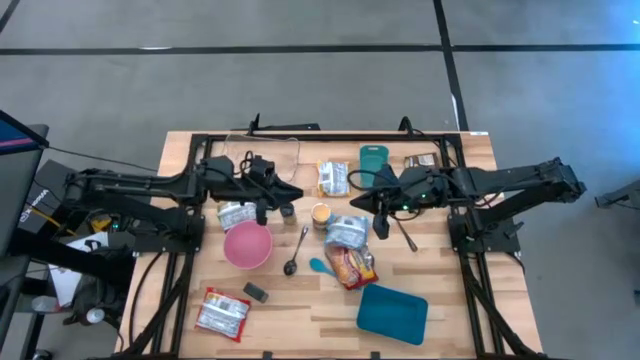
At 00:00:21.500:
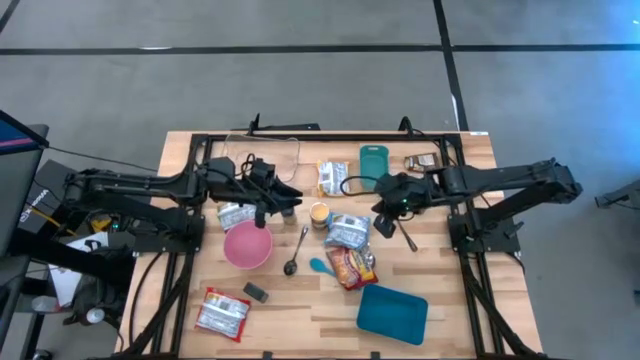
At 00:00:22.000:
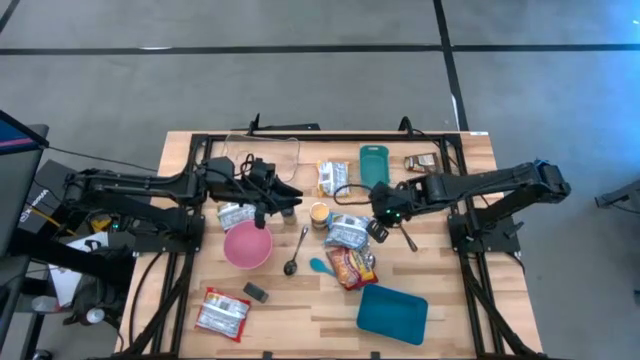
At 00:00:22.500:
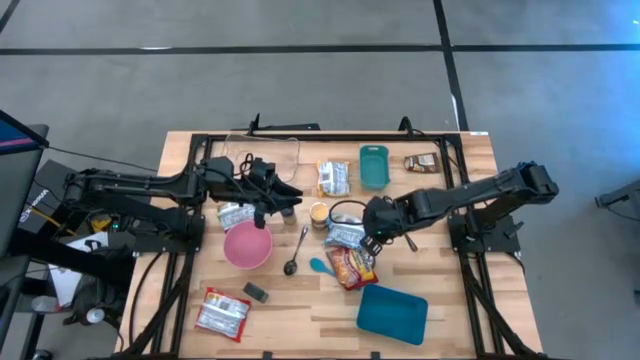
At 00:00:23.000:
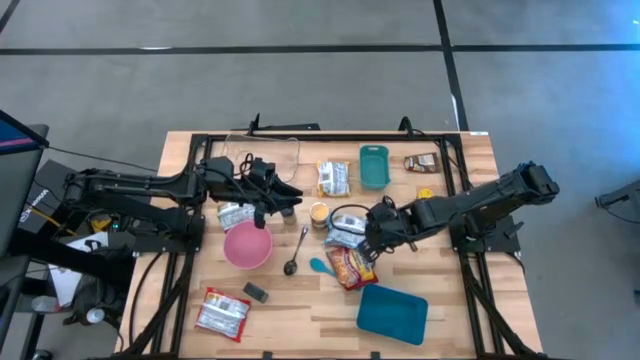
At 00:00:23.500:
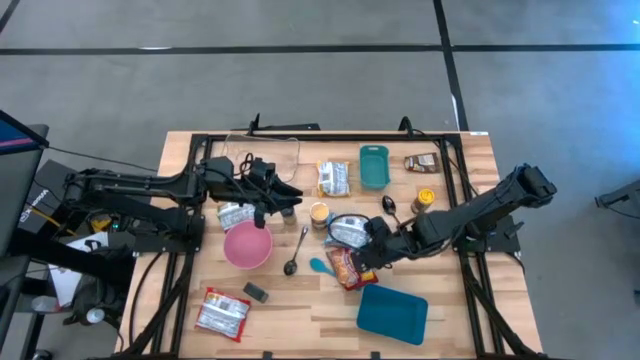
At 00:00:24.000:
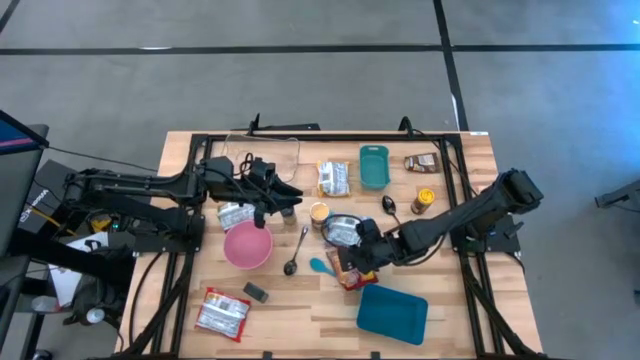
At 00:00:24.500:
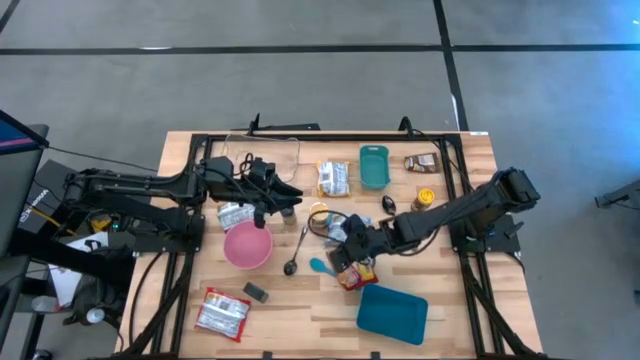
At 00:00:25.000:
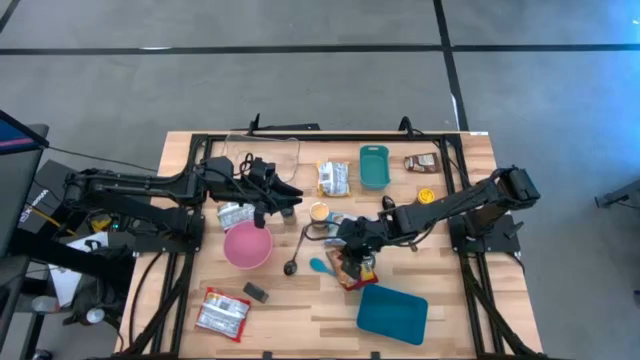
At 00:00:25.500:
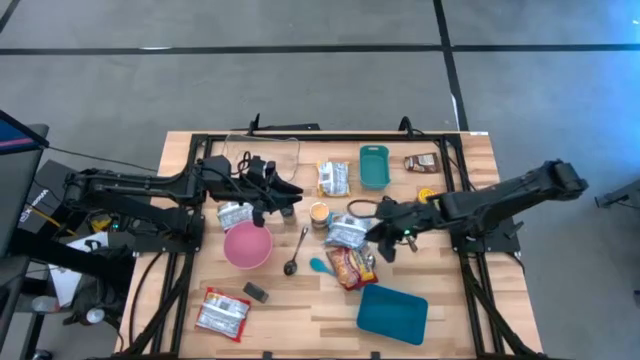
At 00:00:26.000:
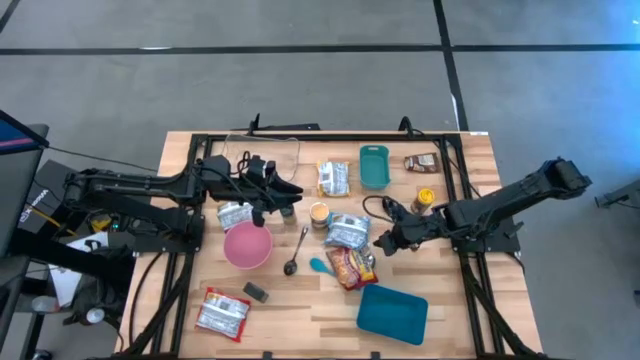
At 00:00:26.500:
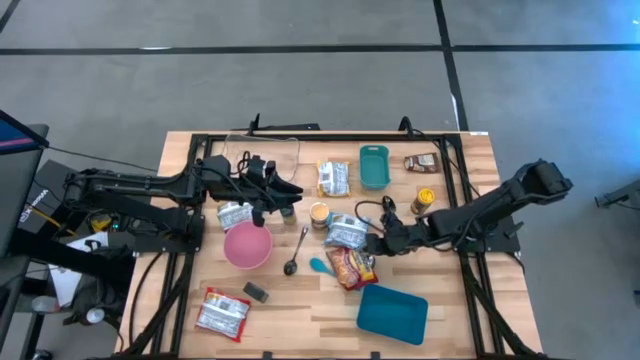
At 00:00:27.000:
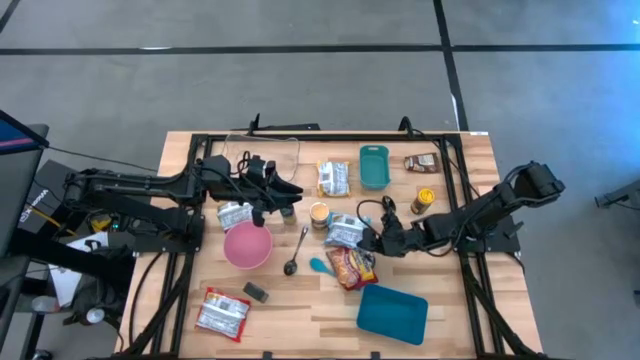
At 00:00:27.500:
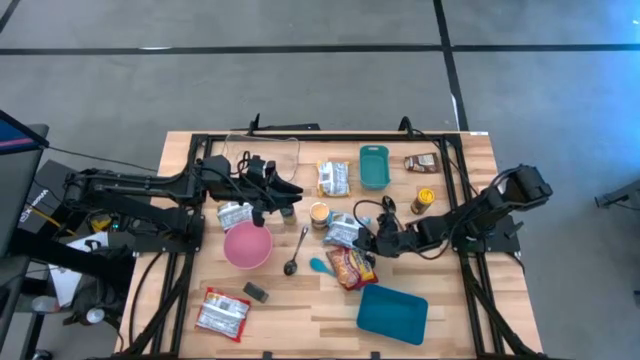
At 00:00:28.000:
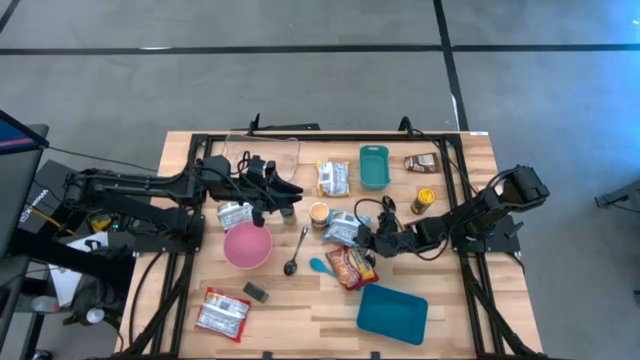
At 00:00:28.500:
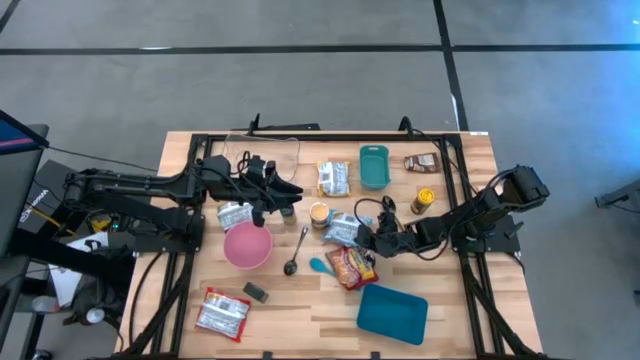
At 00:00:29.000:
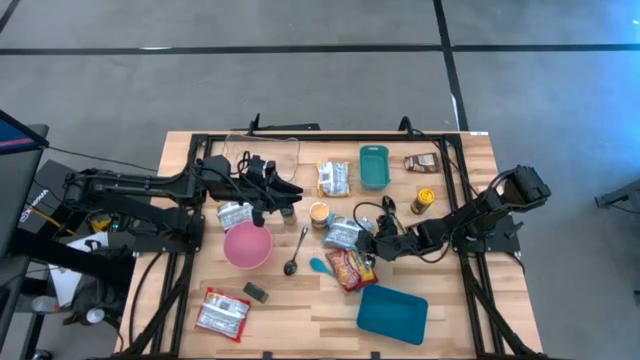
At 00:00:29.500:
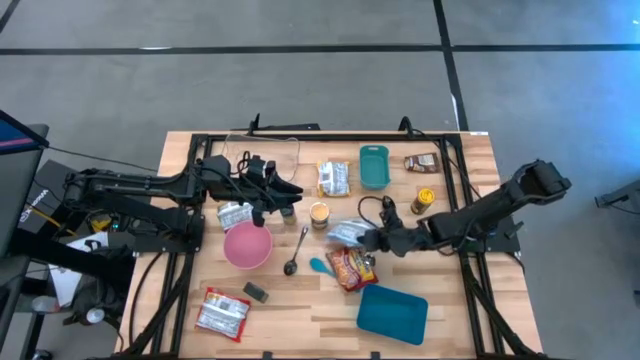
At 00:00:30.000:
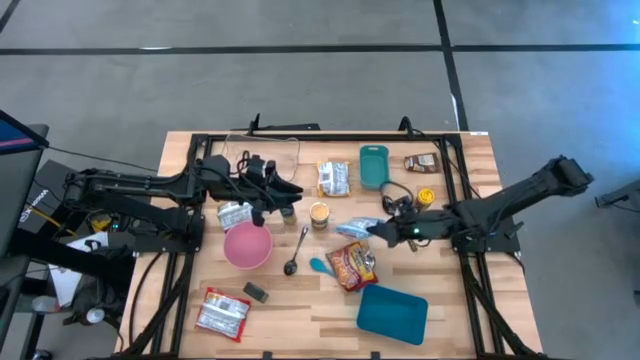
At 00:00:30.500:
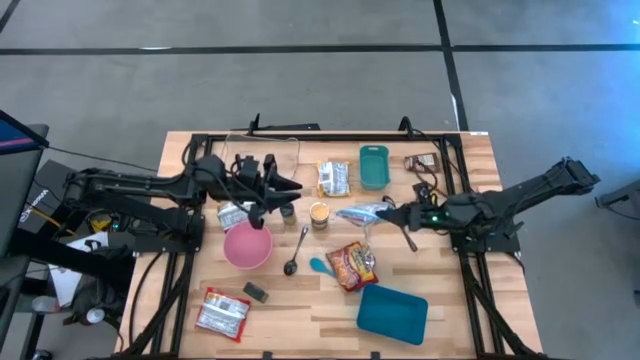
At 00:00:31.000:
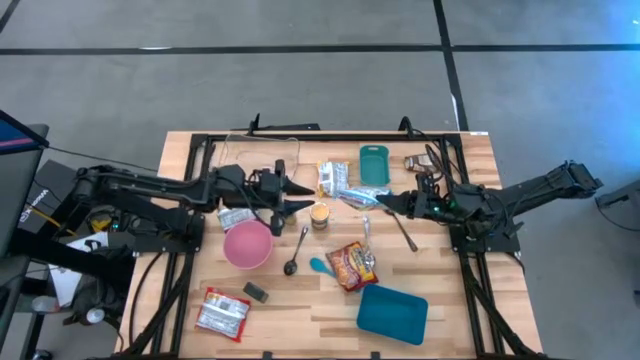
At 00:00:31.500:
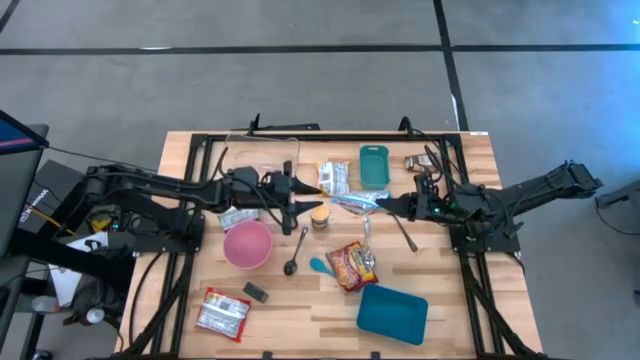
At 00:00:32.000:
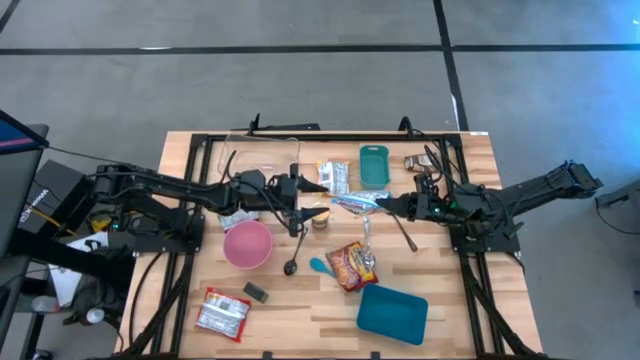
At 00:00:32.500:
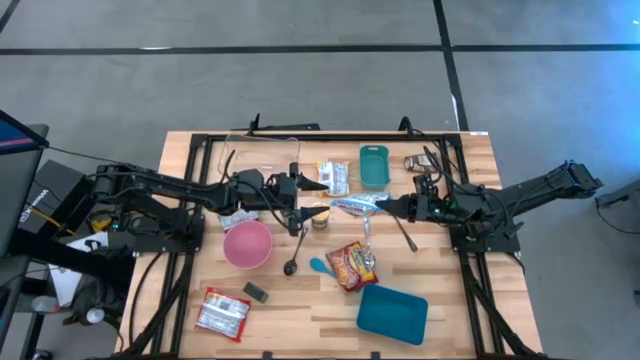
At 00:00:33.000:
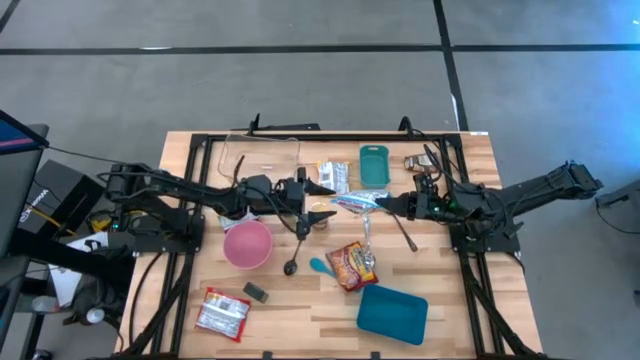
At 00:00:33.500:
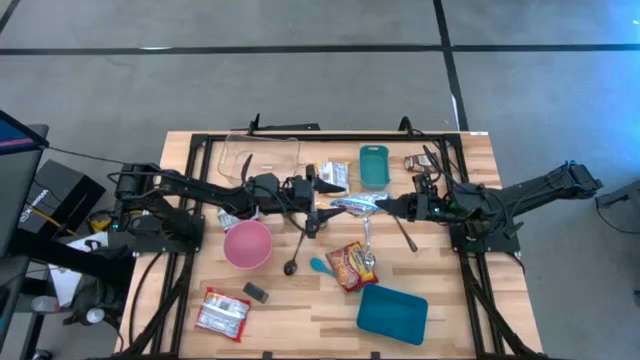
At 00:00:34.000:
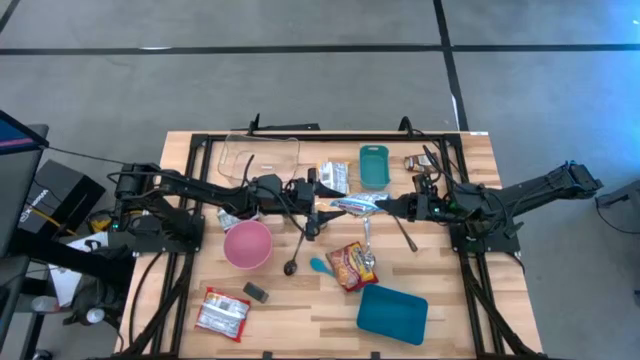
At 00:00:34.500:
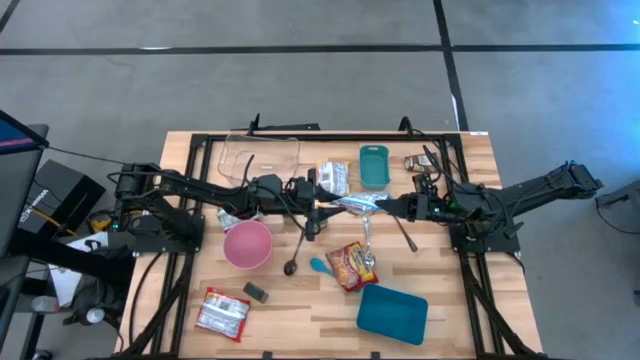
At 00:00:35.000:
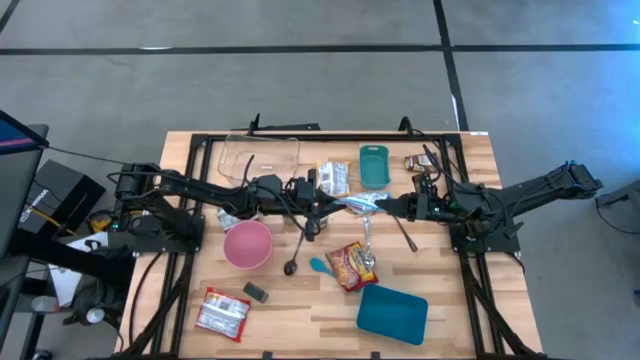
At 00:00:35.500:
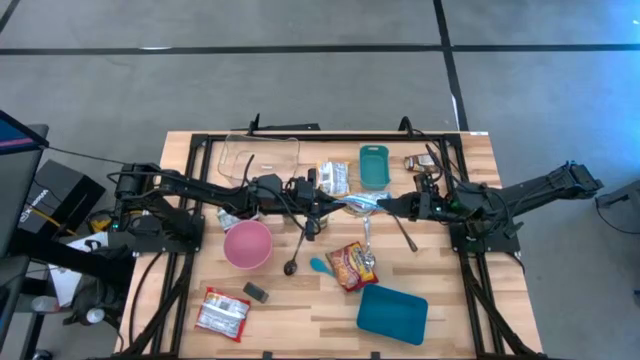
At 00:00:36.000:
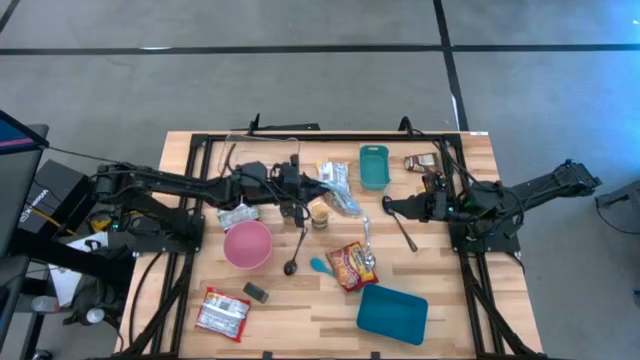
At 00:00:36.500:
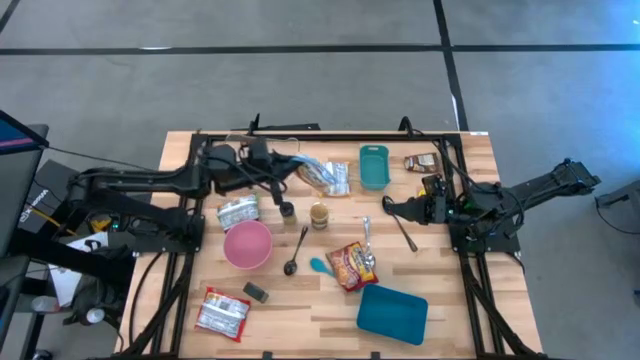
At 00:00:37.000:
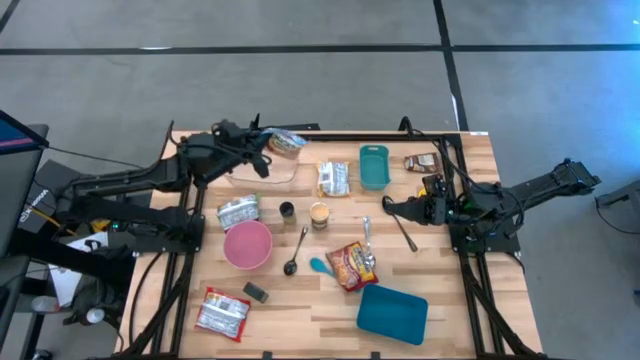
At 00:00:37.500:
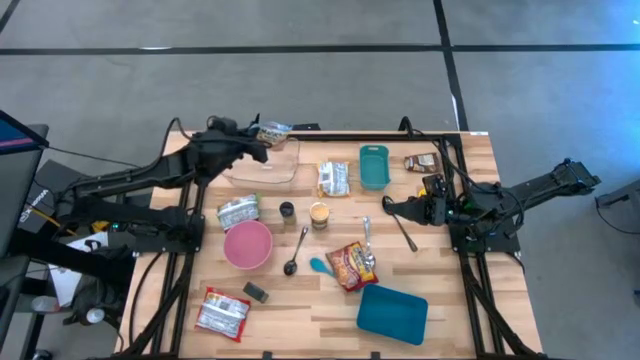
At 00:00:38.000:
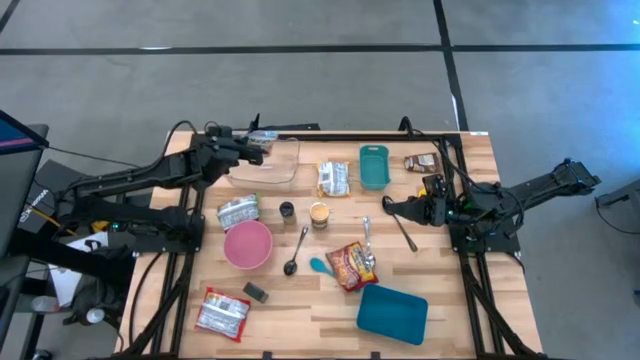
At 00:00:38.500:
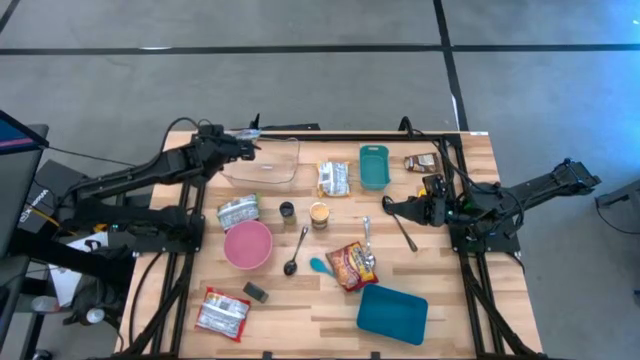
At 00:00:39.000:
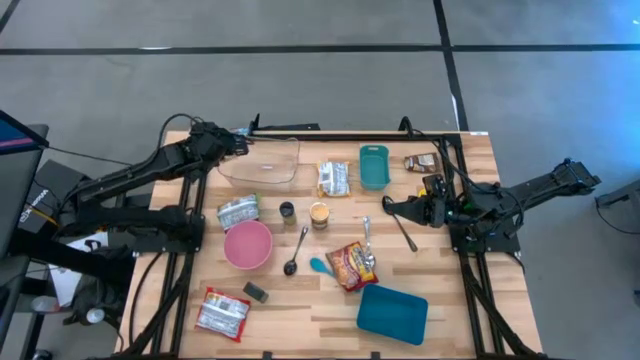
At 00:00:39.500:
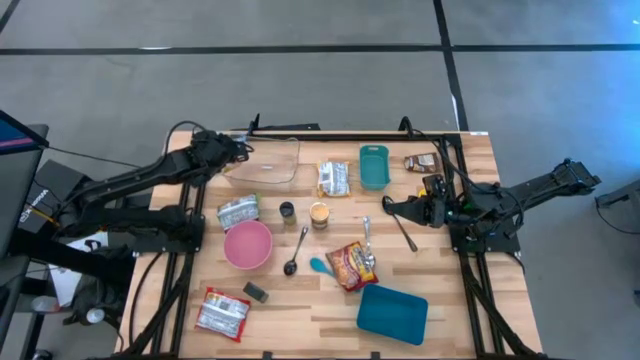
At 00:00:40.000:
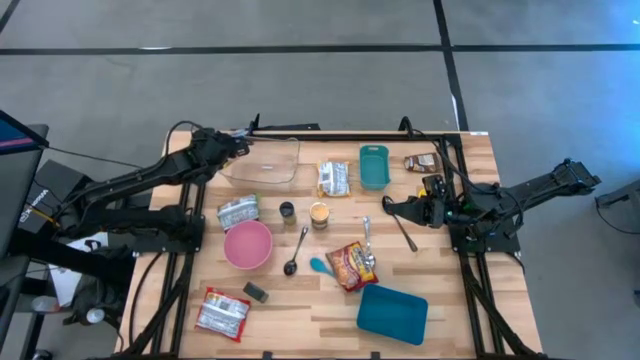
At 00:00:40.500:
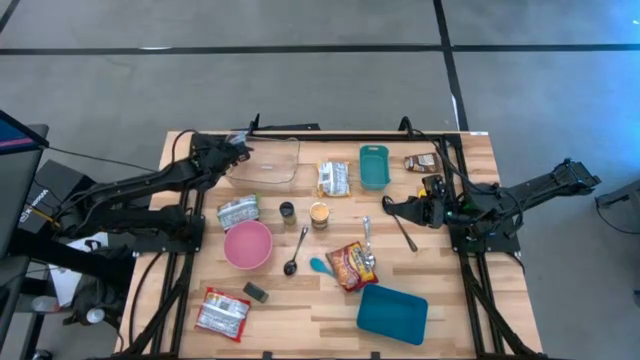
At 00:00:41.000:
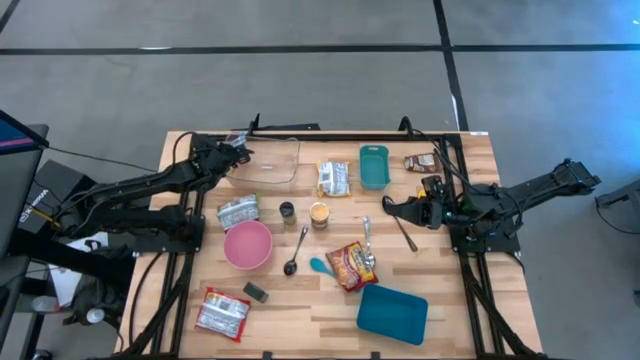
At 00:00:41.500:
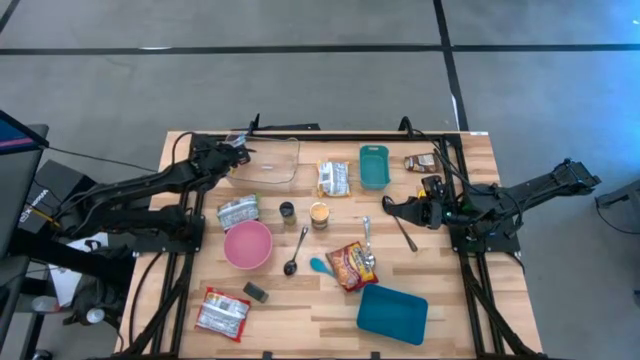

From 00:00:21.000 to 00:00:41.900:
Task: Pick & Place Food Item
Put the blue noodle pack into the transparent bin
